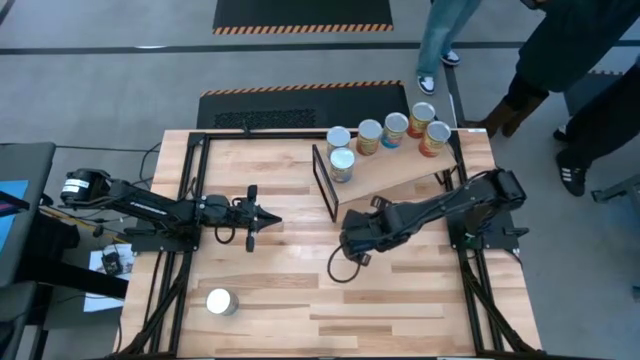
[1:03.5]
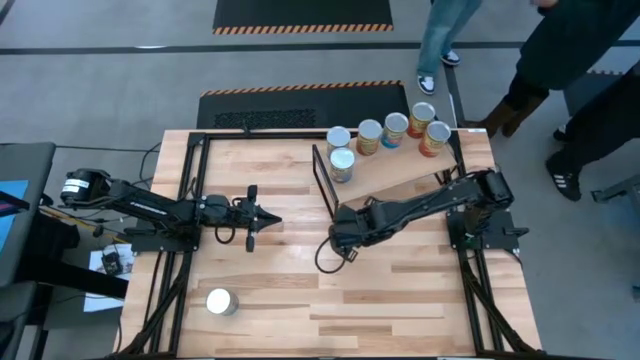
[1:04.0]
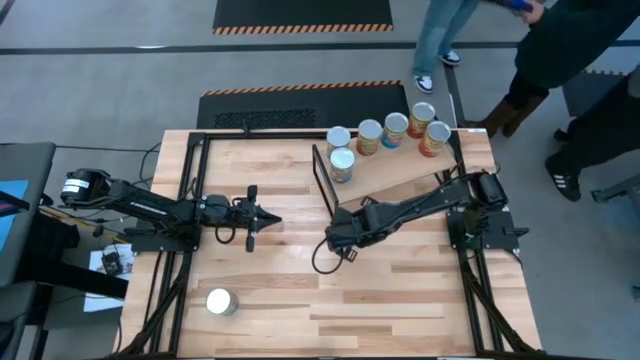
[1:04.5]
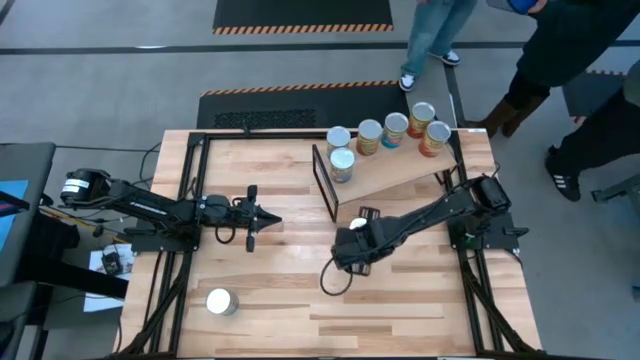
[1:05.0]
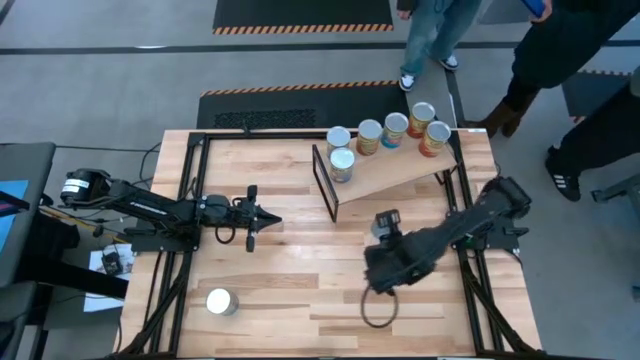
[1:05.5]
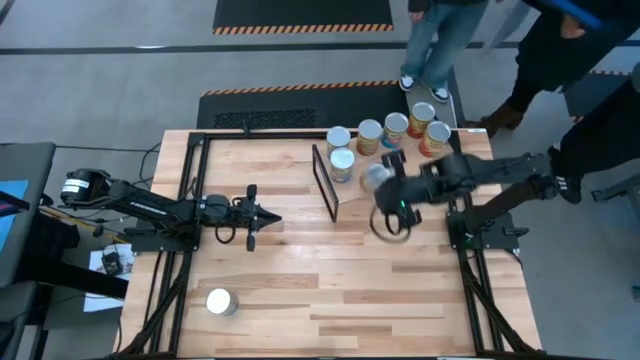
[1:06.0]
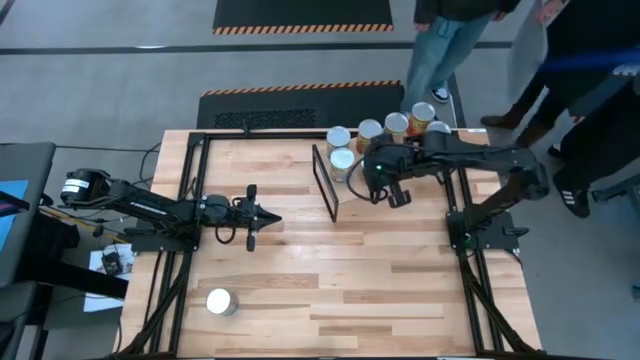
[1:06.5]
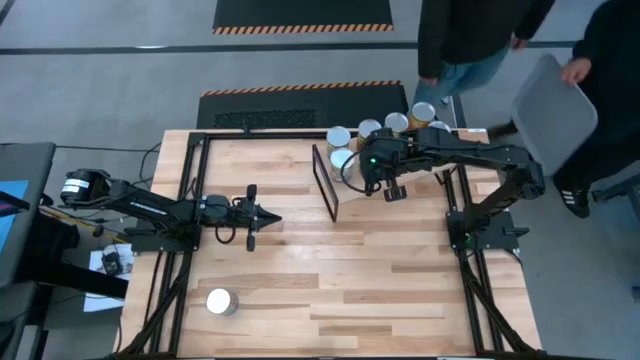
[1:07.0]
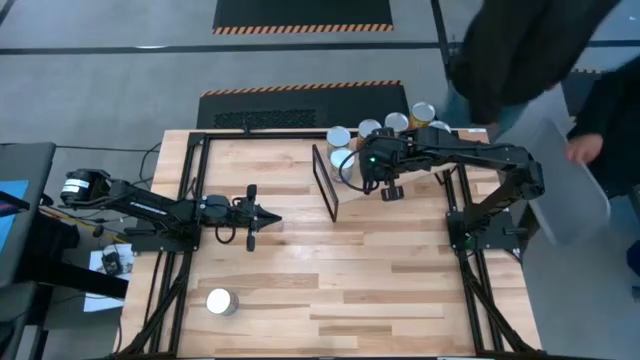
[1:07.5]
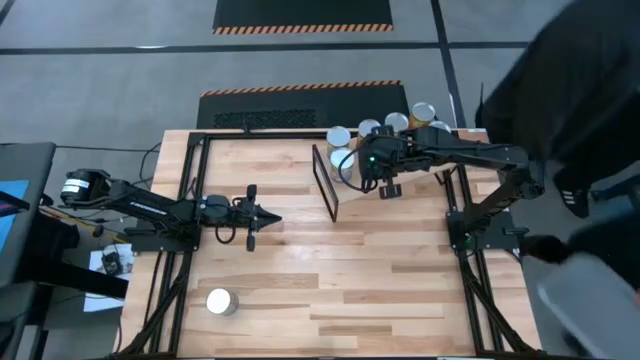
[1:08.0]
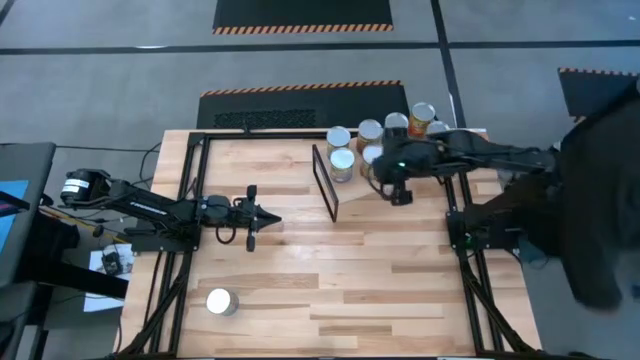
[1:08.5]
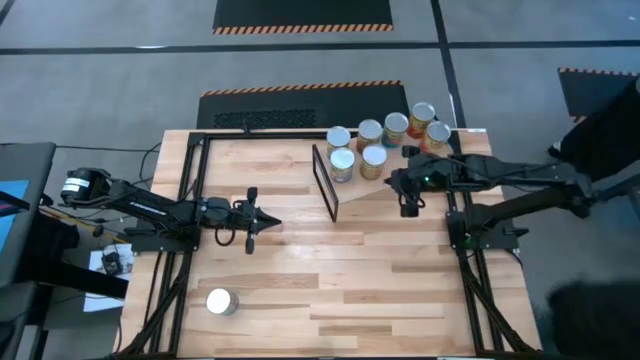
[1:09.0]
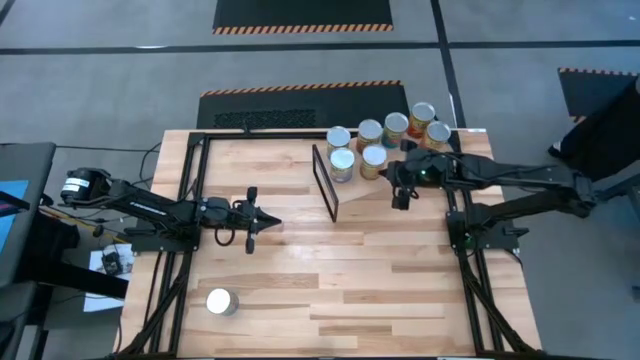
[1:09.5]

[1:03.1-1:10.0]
Task: Pick and place cans onto a shelf
Put the canned green beans aligned with the other canned green beans on the shelf

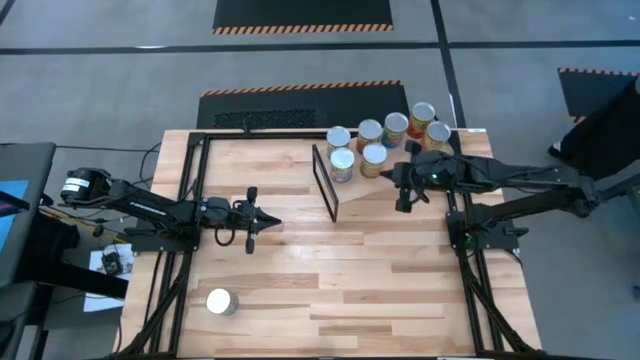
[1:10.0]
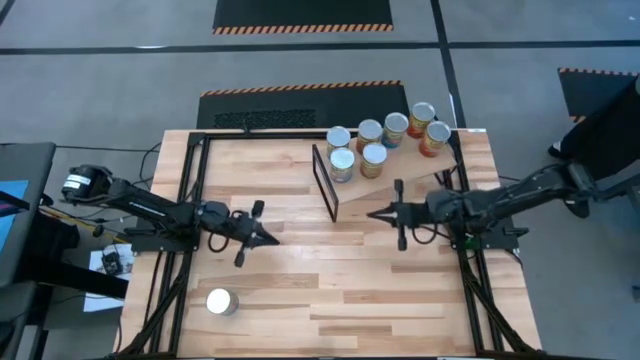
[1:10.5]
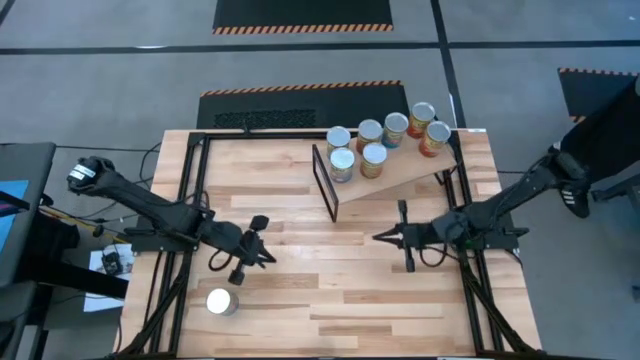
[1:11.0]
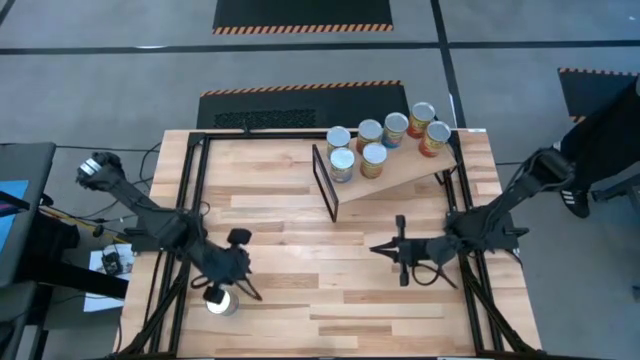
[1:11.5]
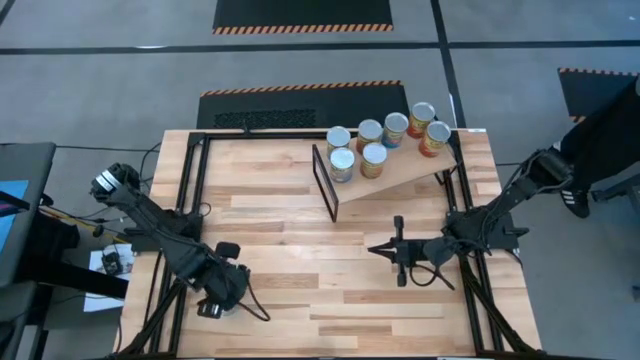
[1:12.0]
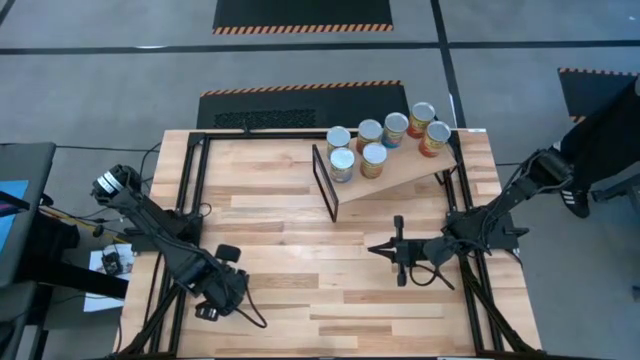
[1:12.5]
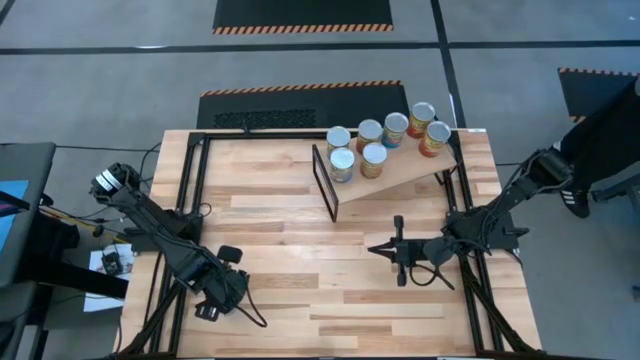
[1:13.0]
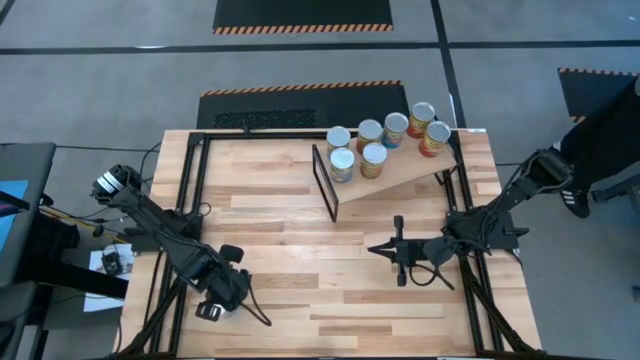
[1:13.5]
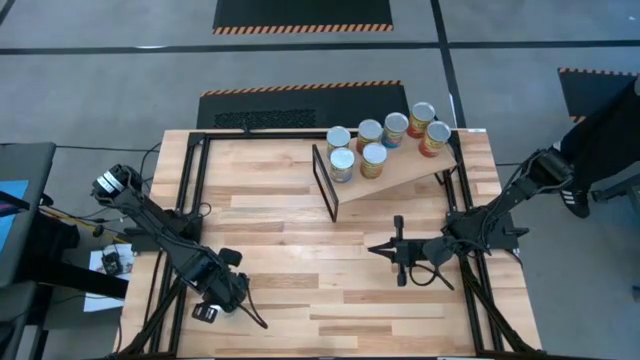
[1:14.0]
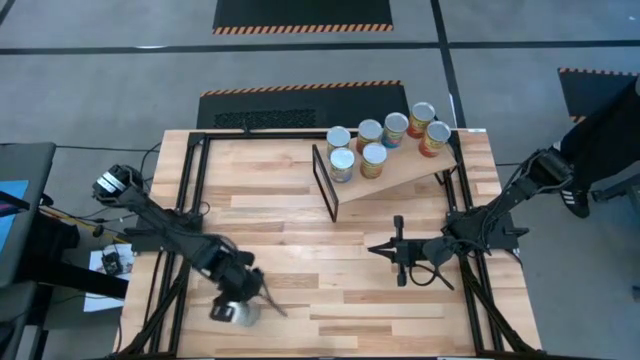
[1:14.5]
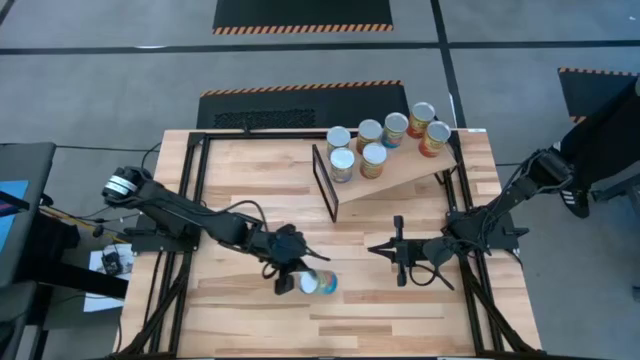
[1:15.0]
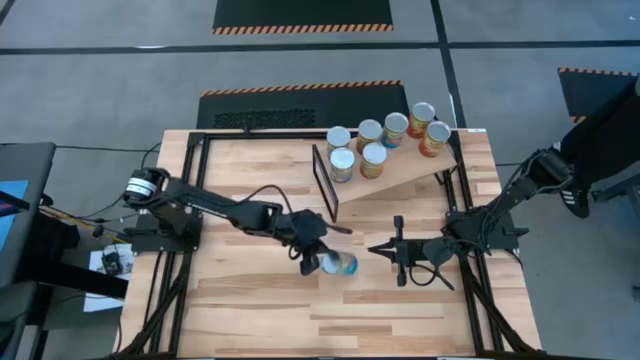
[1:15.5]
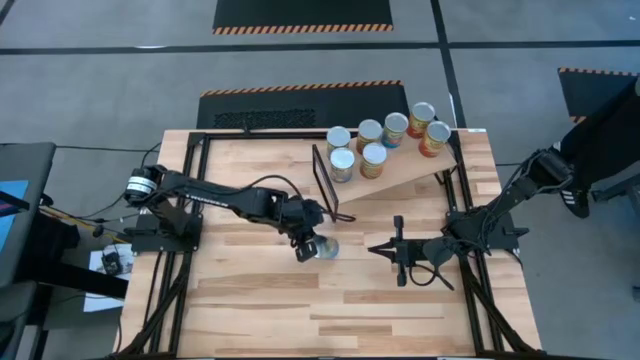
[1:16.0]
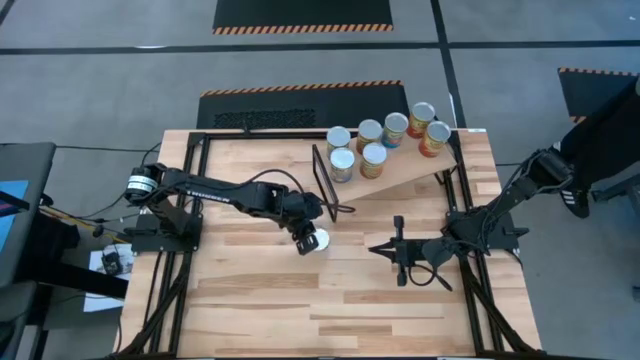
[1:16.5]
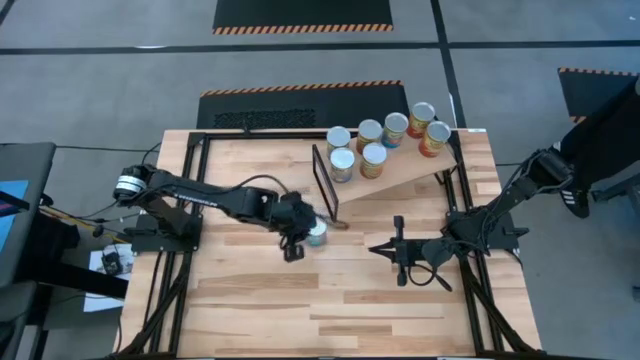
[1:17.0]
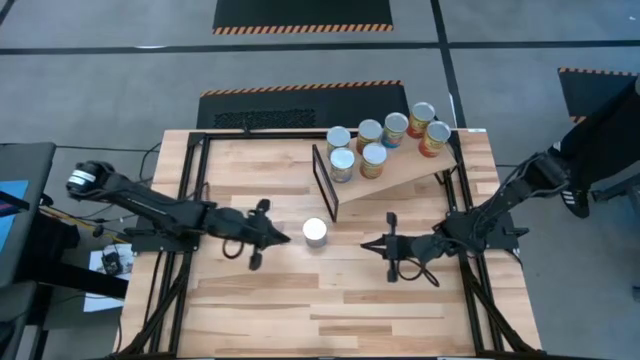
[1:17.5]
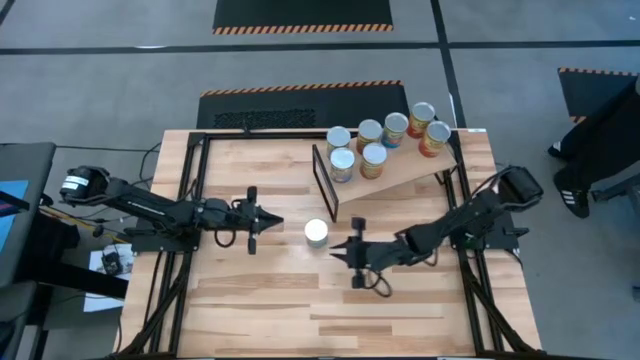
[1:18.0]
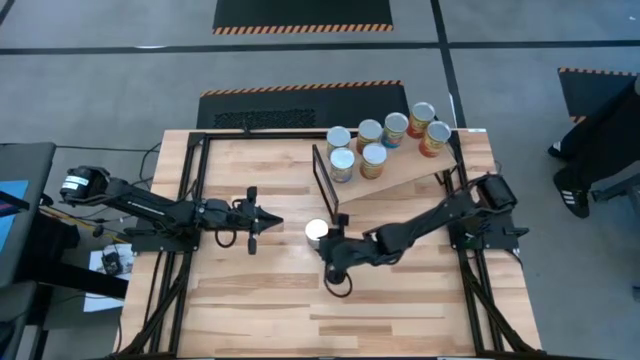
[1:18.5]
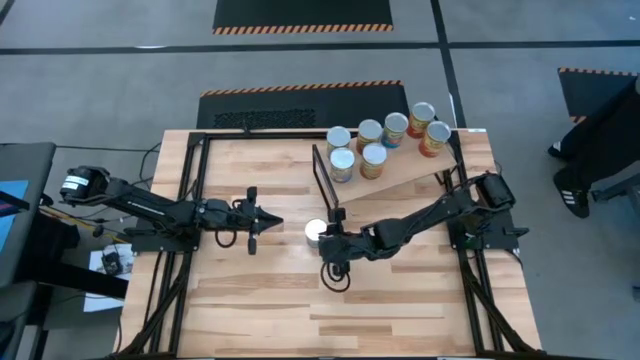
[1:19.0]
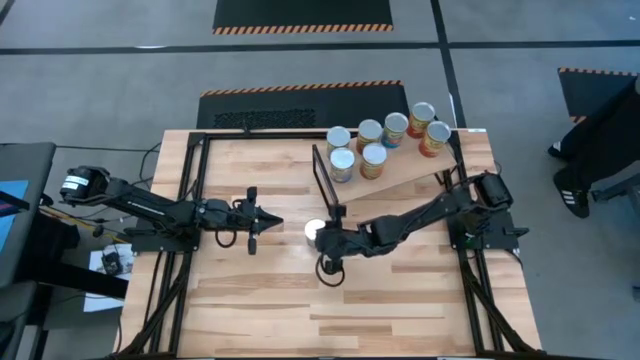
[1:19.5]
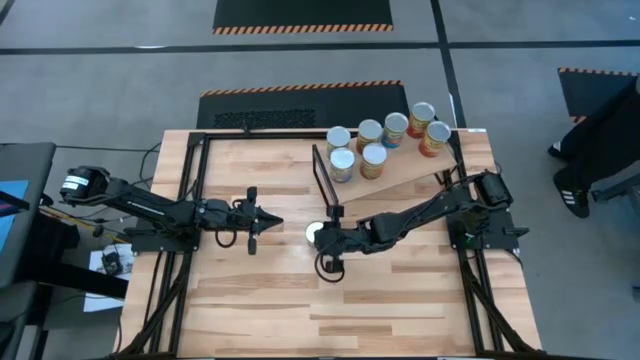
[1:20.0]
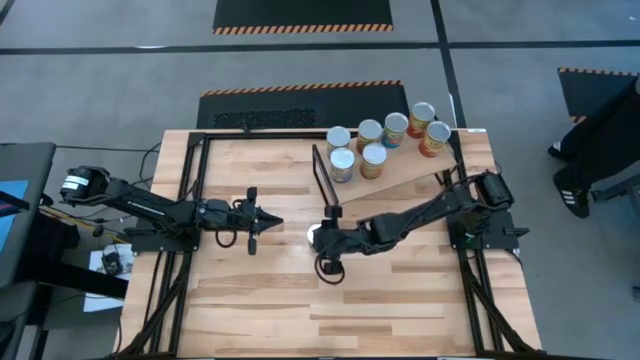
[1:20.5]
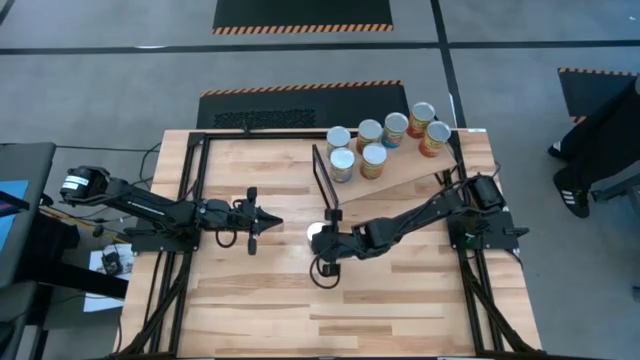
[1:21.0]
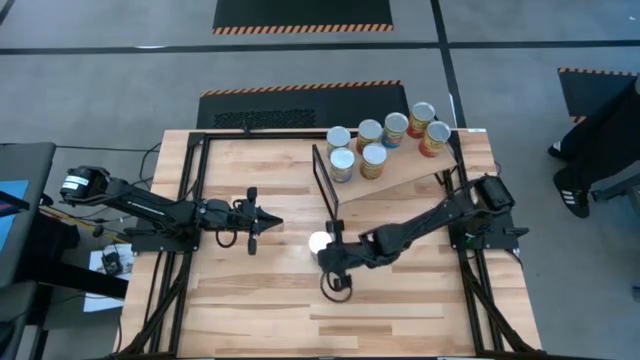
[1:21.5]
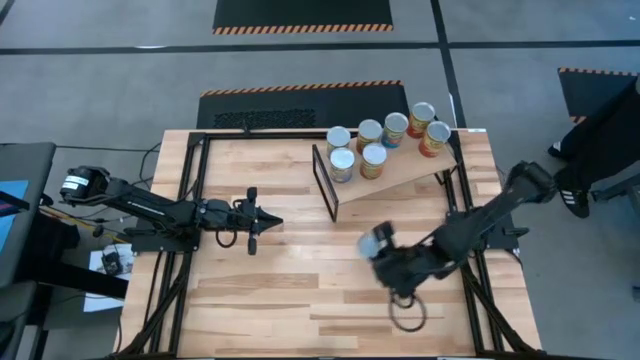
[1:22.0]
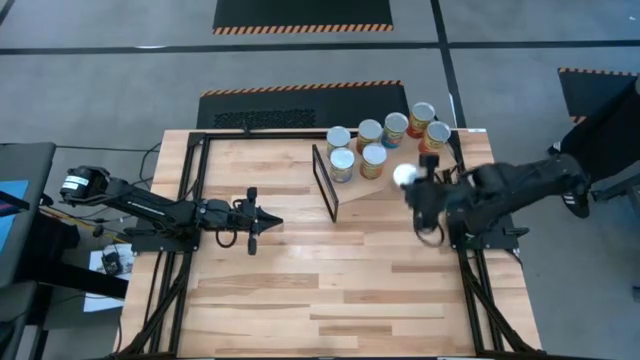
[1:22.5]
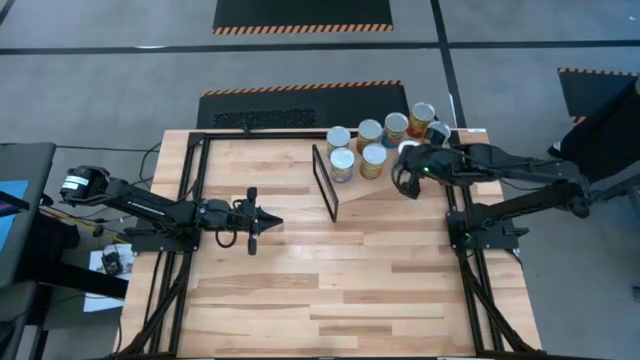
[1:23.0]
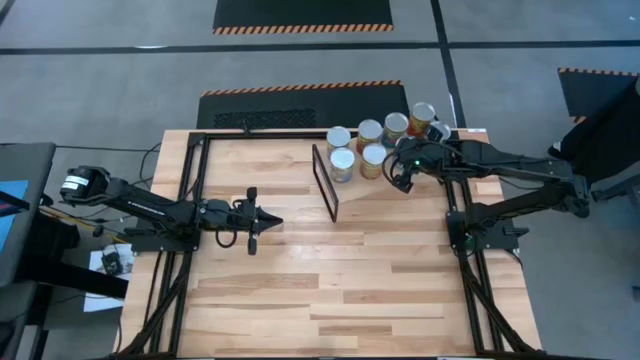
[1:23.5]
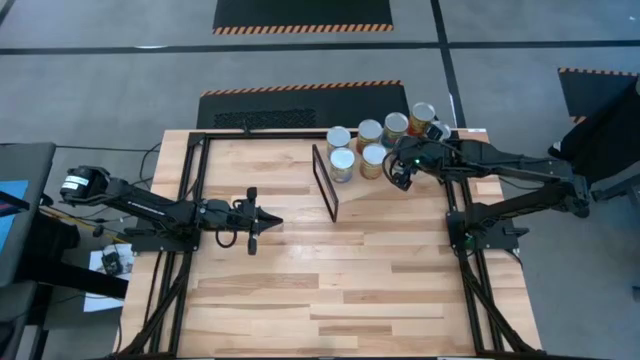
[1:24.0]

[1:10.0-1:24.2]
Put the canned tomatoes aligned with the other canned tomatoes on the shelf
